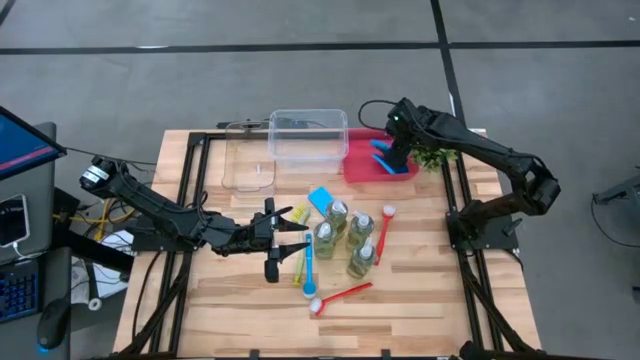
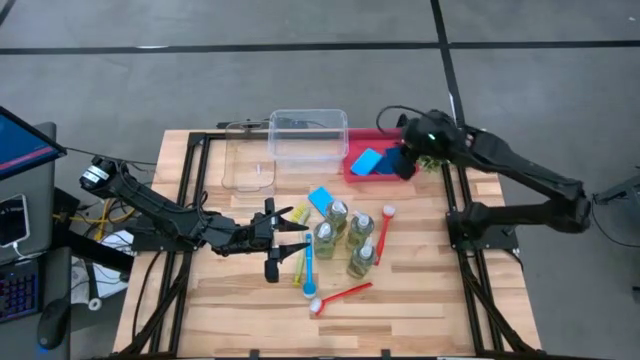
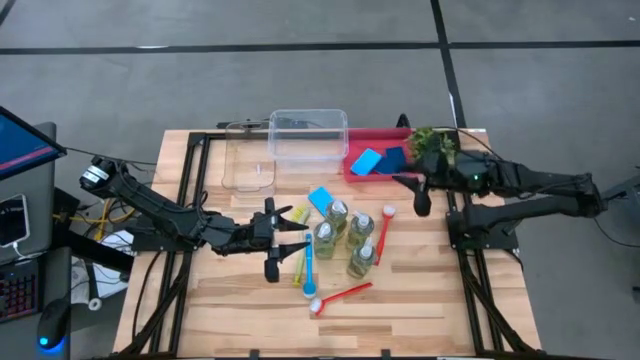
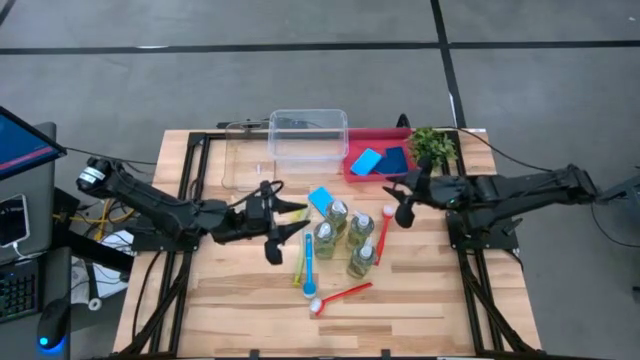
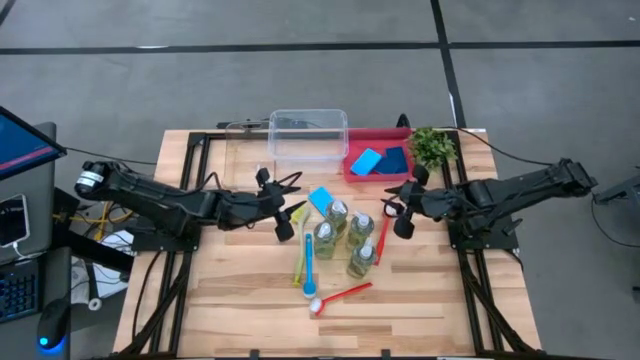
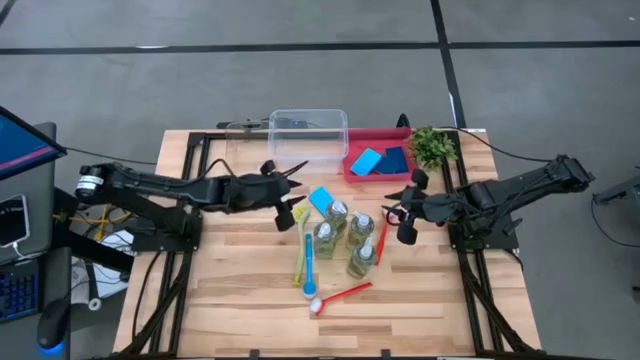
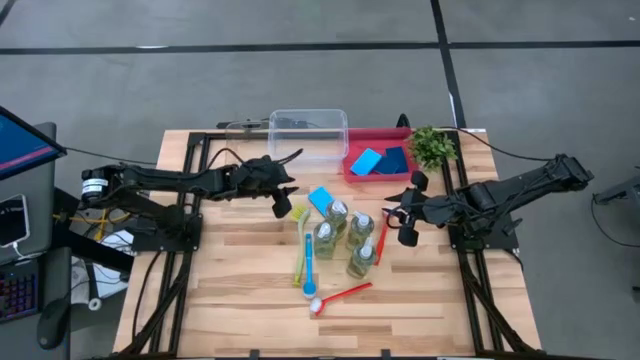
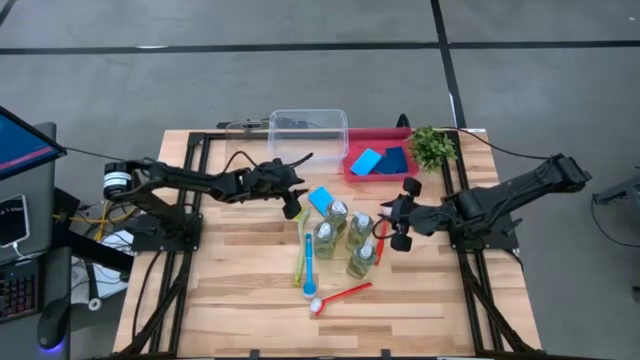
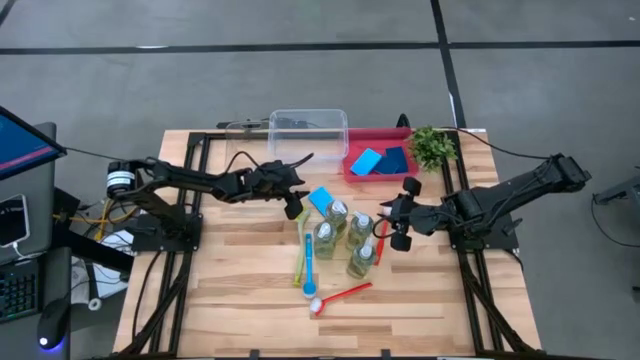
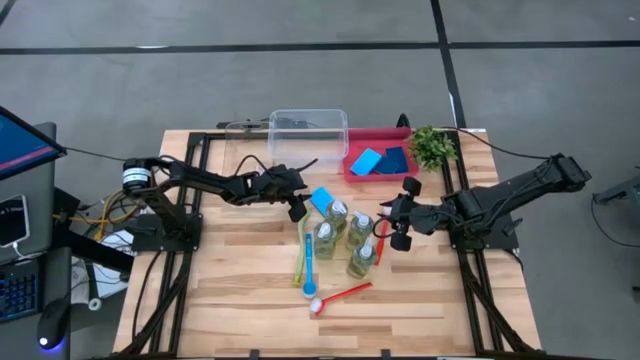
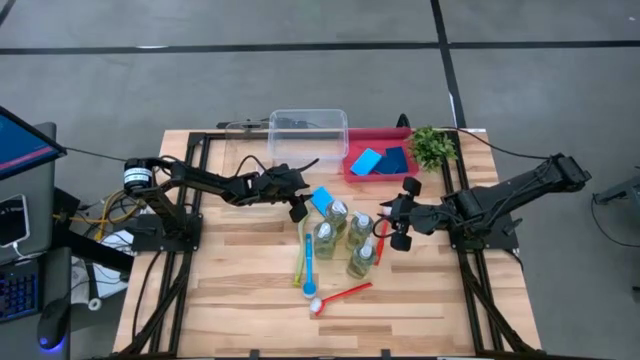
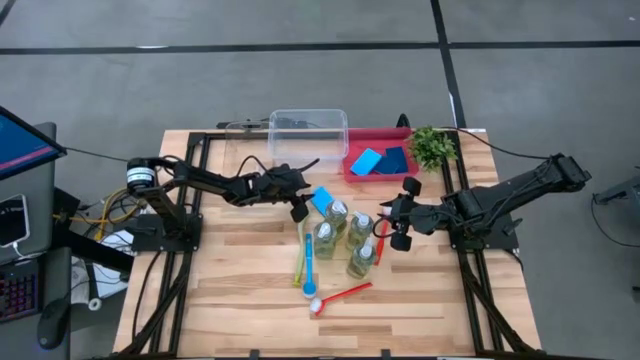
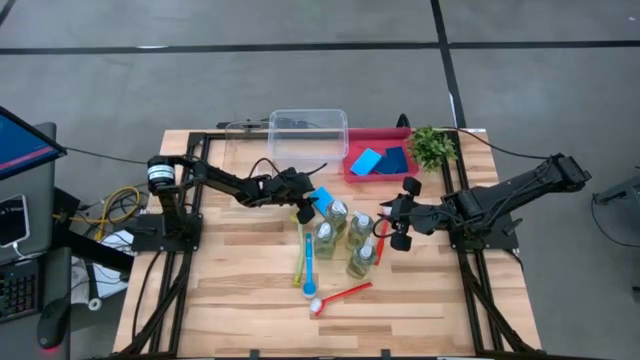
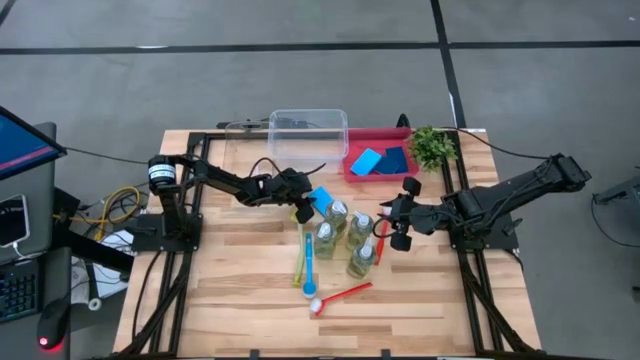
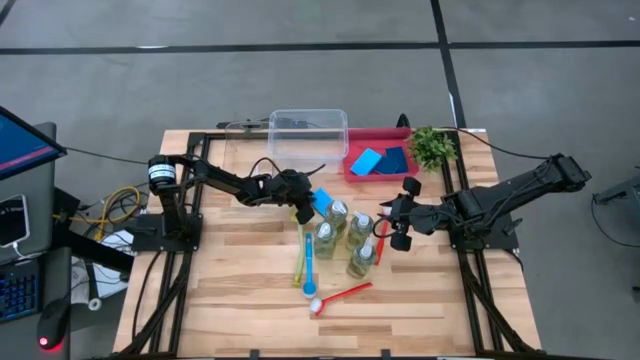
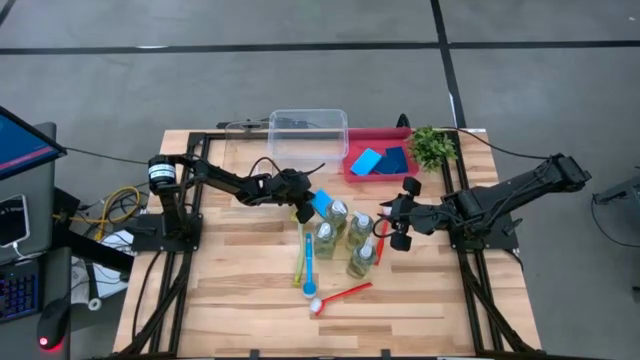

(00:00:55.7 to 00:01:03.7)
Task: Pick & Place Kitchen Sink Supplies
Put the blue sponge into the red bin

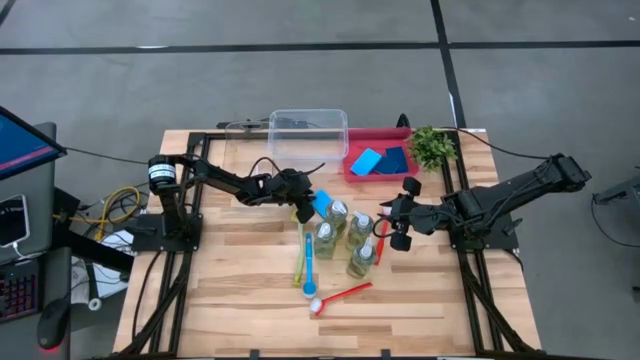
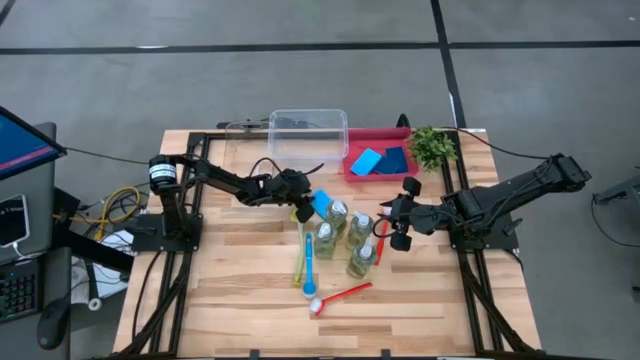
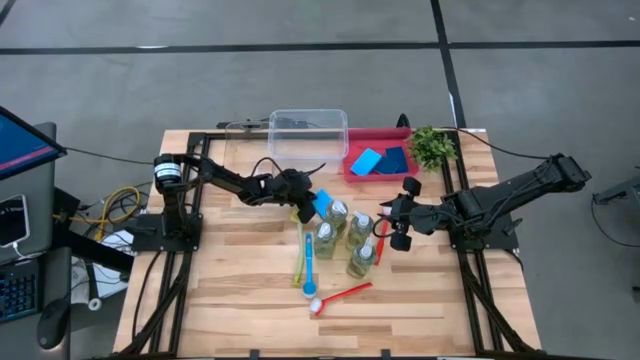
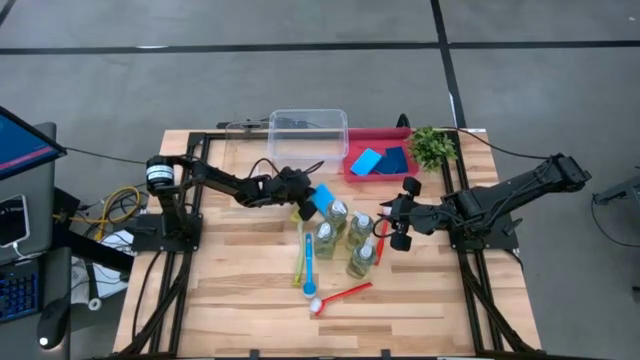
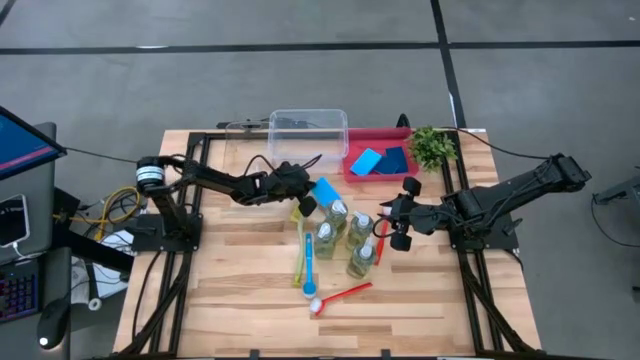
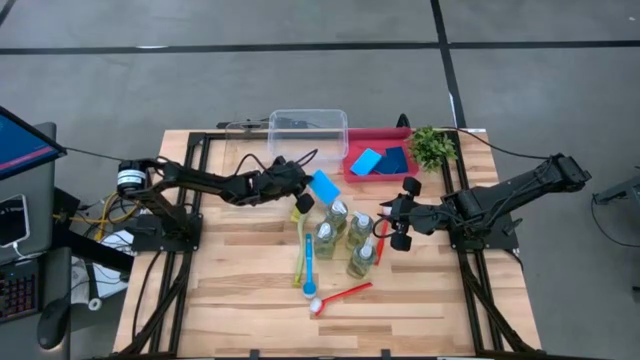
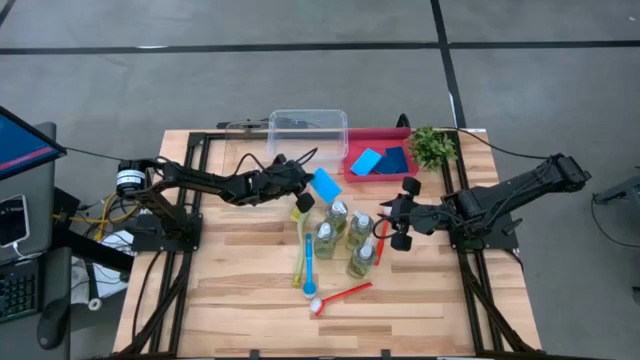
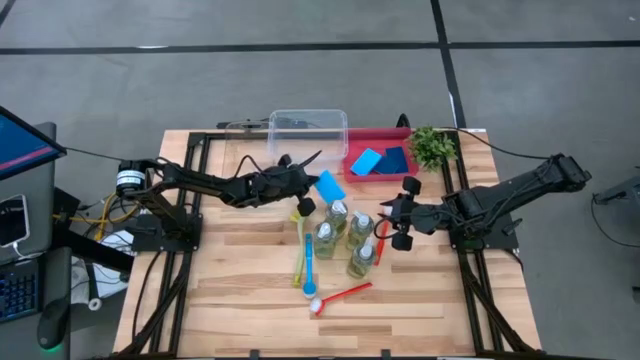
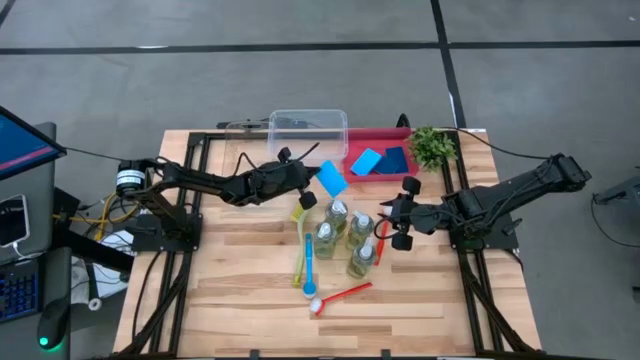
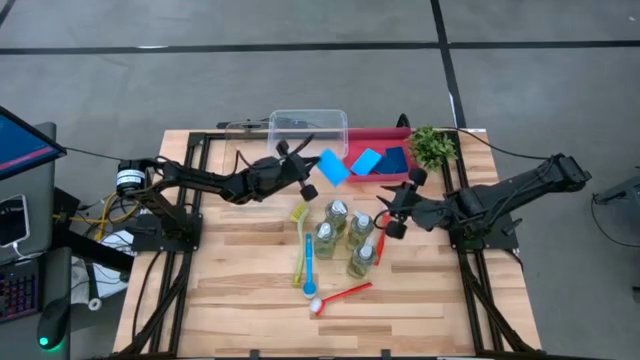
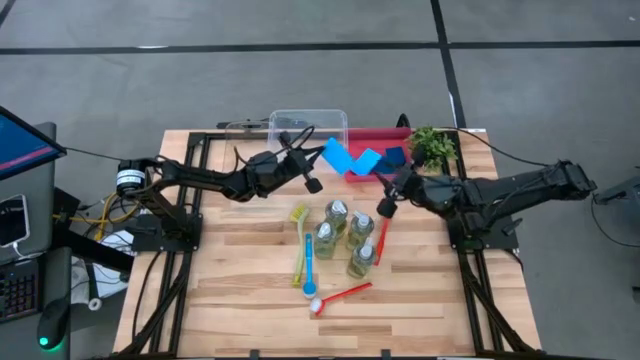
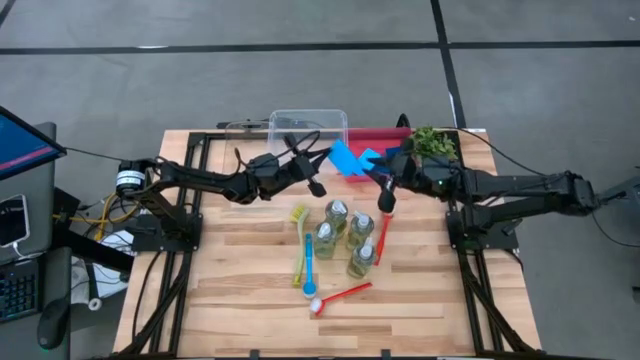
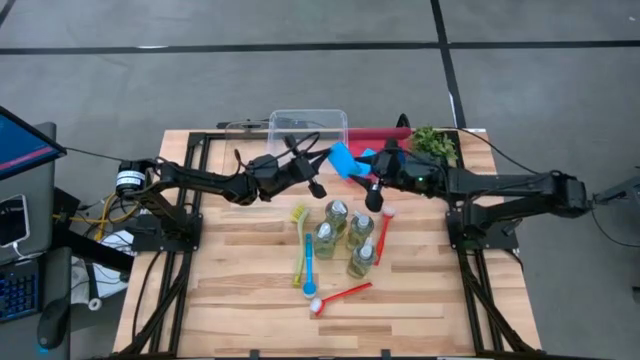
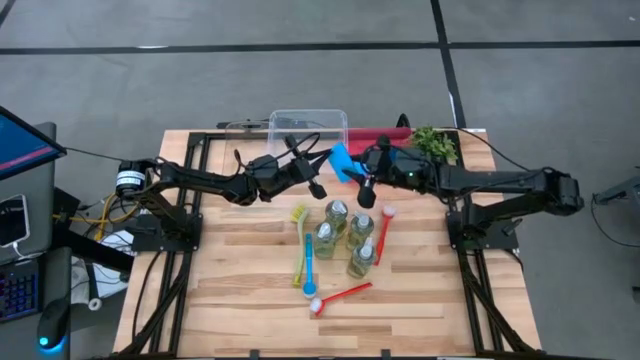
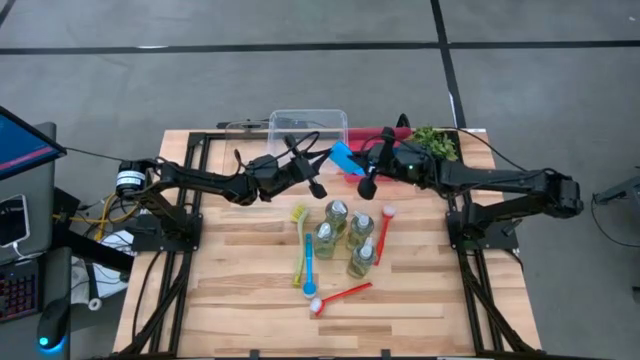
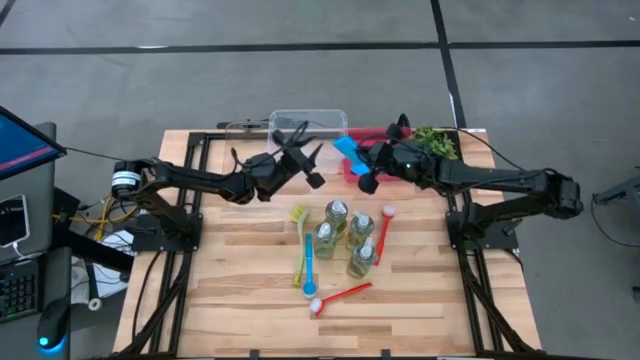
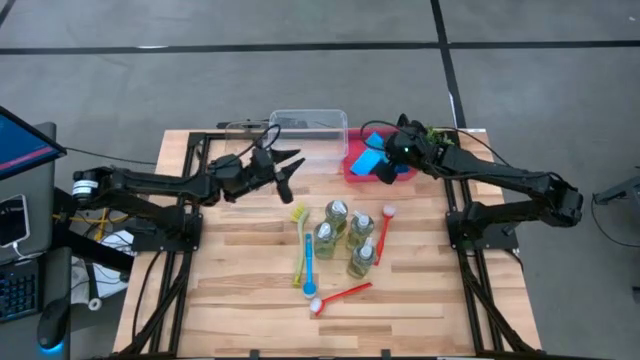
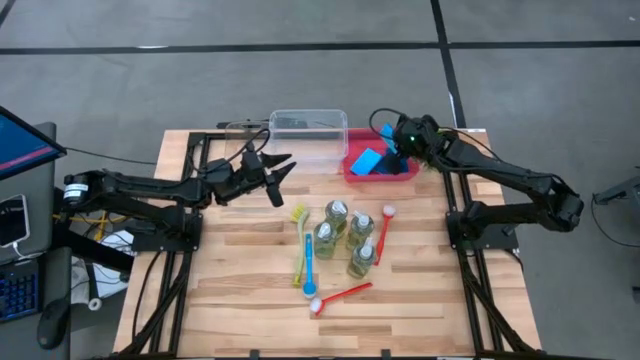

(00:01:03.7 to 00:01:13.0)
Put the blue sponge into the red bin

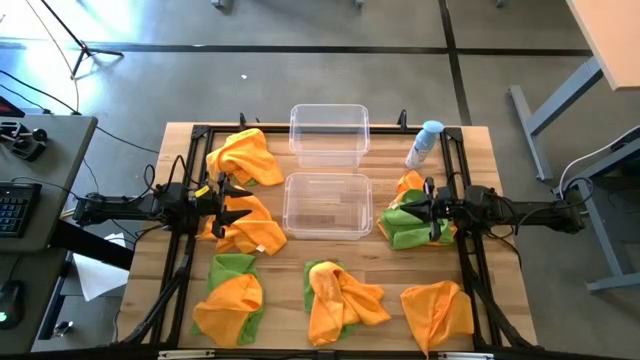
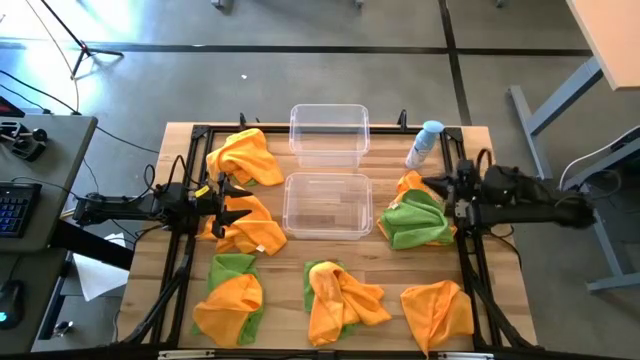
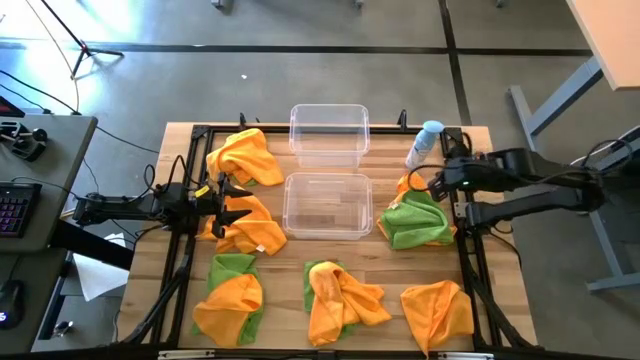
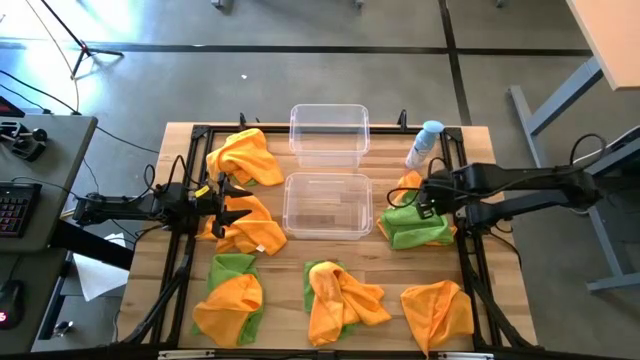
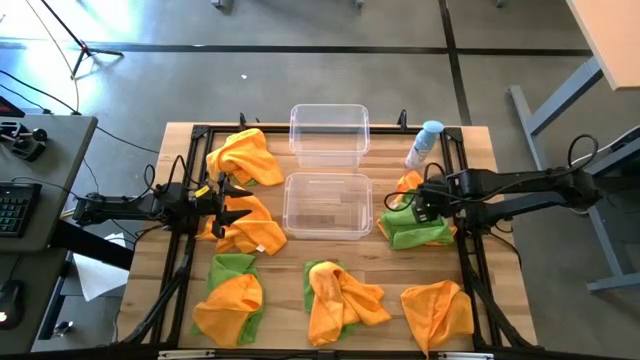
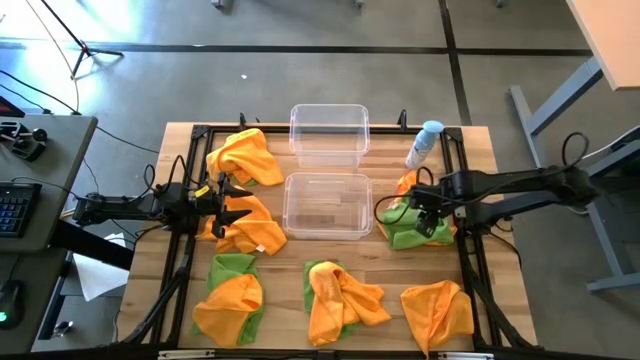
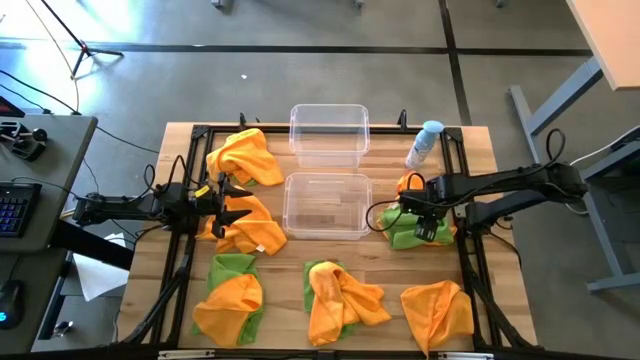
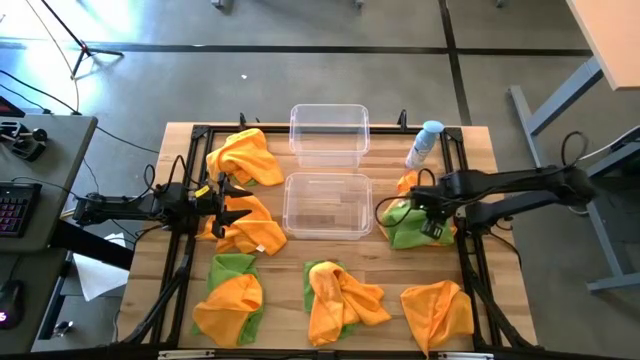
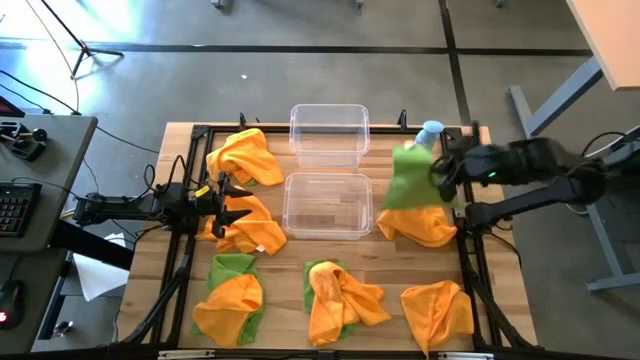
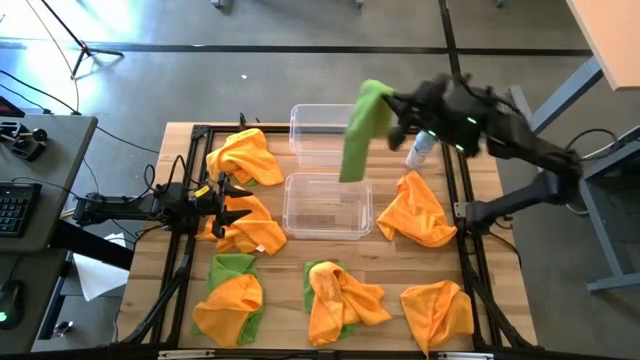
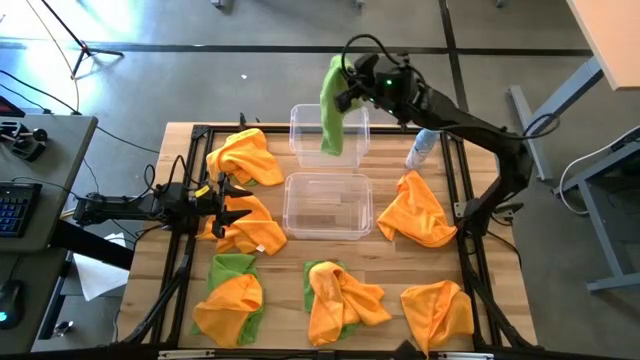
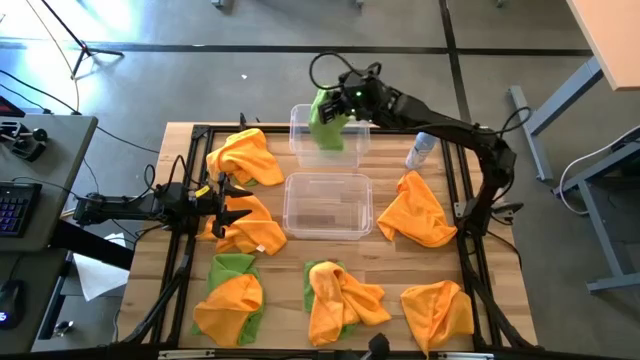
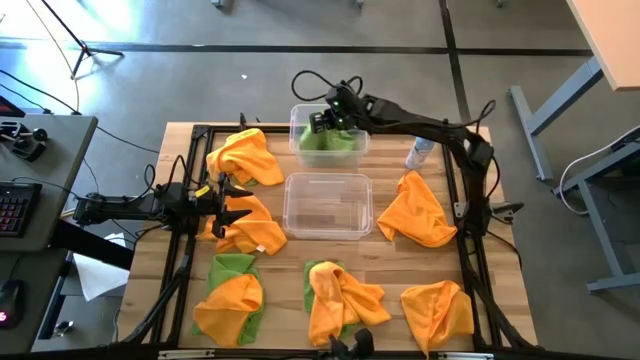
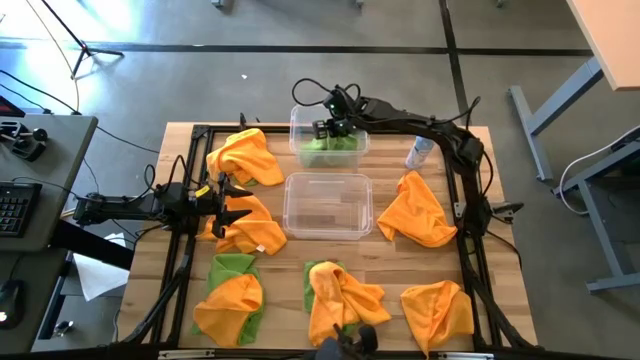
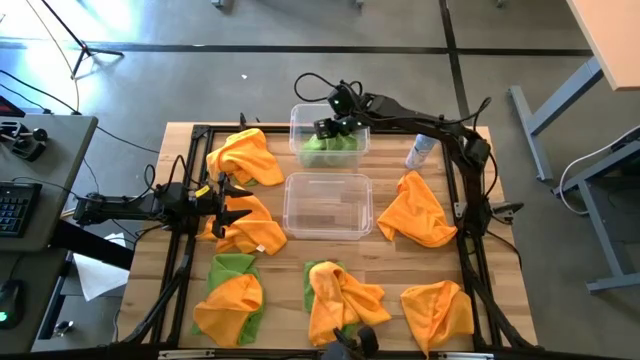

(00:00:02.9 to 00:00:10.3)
Task: Sort microfiber towel by color & place in baskets
Put the green microfiber towel into the top transparent bin
